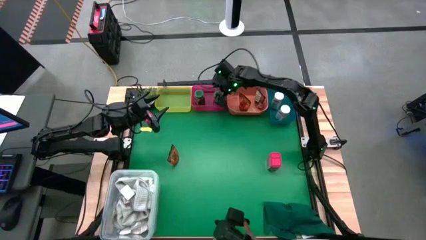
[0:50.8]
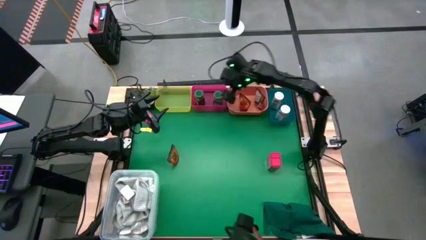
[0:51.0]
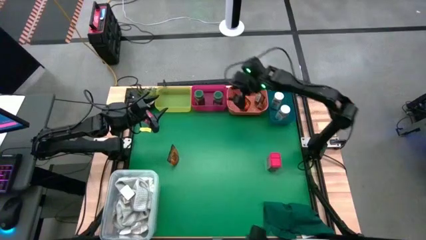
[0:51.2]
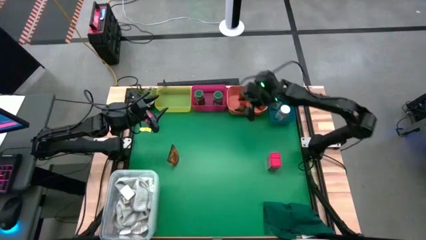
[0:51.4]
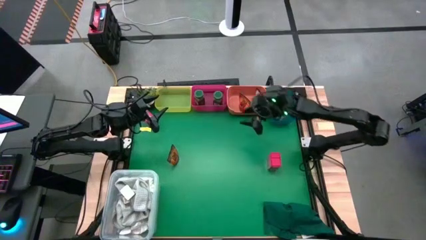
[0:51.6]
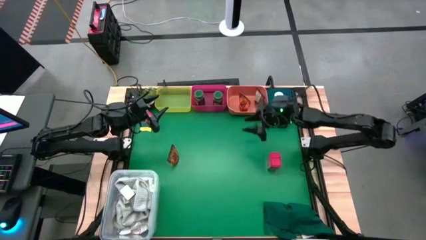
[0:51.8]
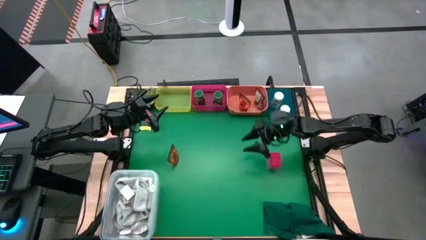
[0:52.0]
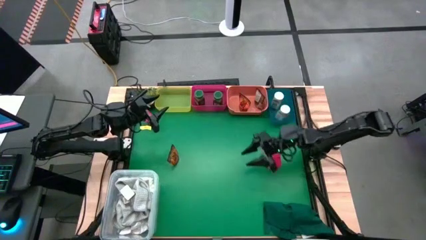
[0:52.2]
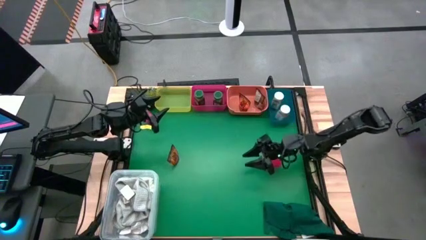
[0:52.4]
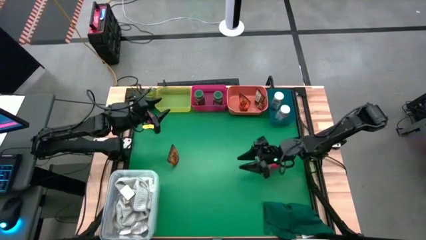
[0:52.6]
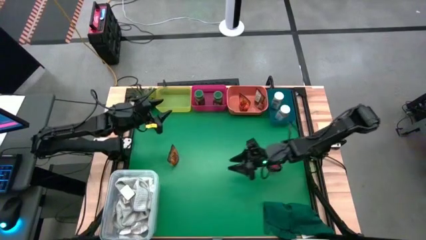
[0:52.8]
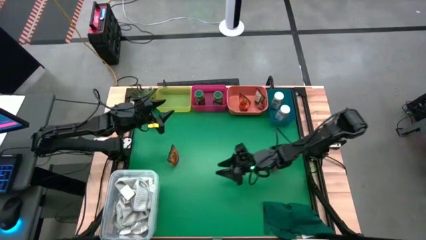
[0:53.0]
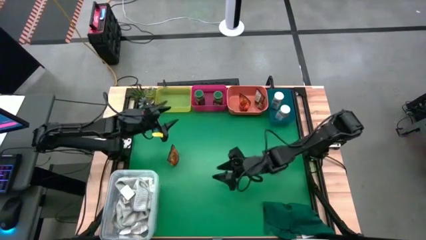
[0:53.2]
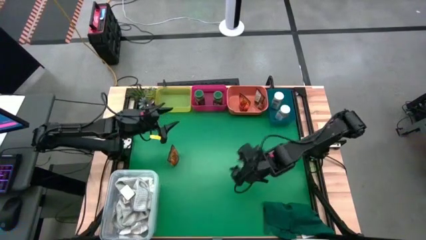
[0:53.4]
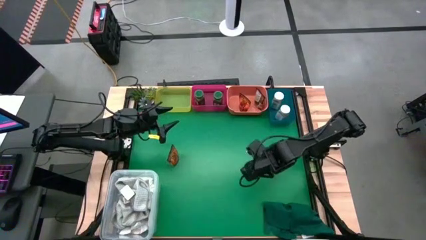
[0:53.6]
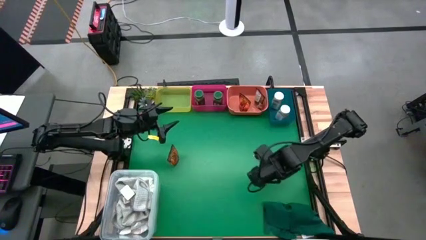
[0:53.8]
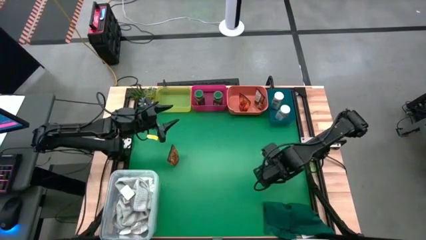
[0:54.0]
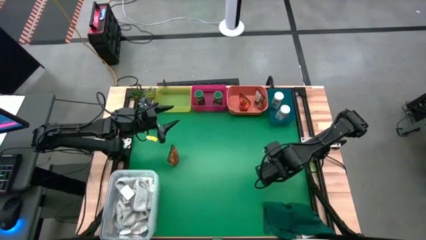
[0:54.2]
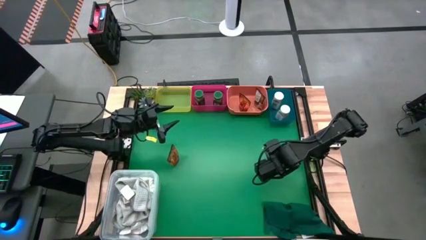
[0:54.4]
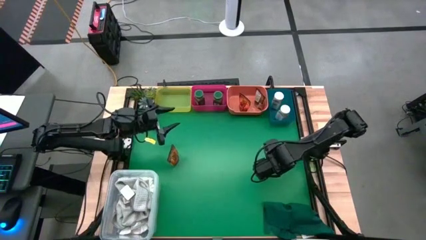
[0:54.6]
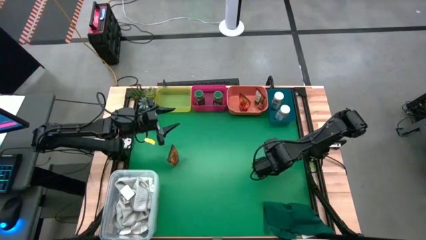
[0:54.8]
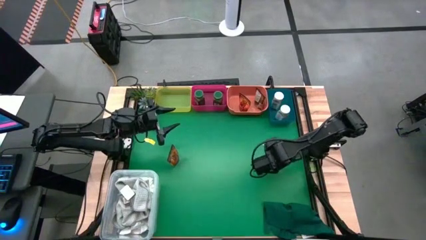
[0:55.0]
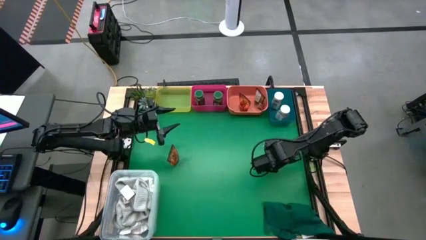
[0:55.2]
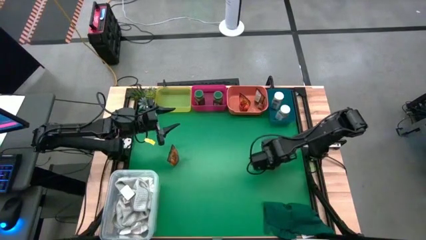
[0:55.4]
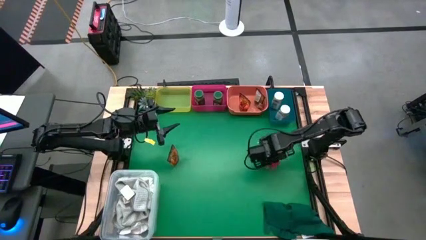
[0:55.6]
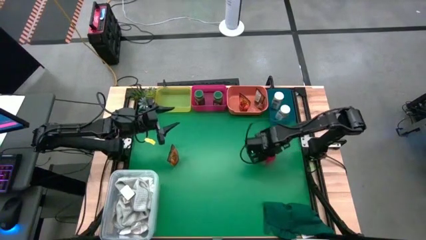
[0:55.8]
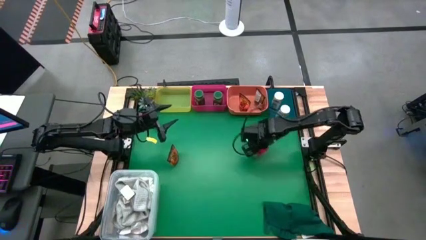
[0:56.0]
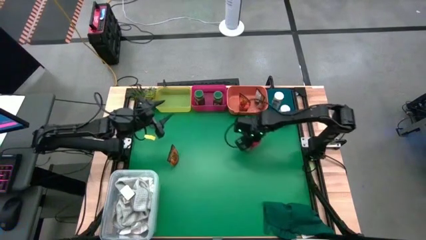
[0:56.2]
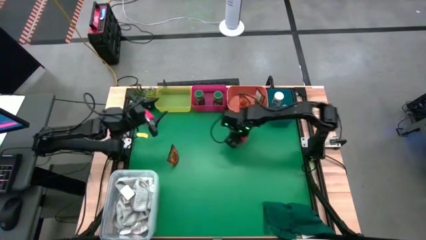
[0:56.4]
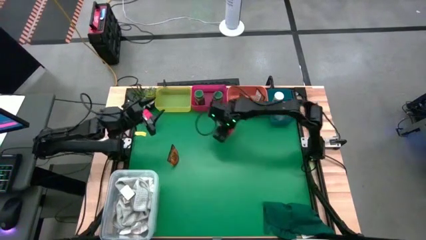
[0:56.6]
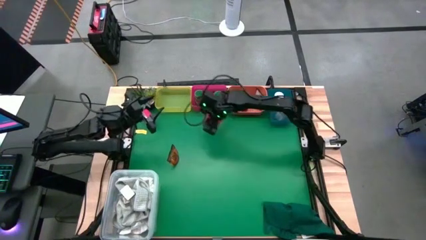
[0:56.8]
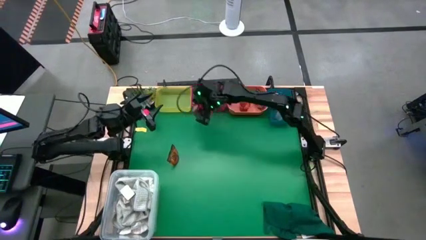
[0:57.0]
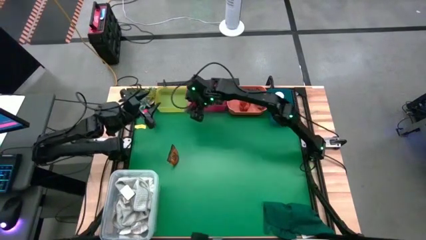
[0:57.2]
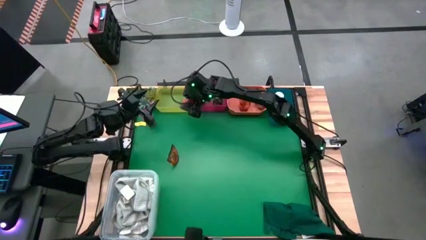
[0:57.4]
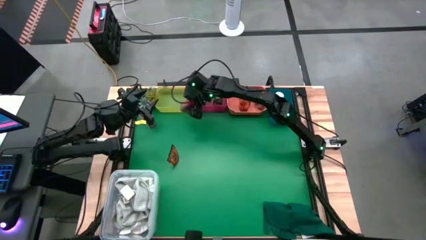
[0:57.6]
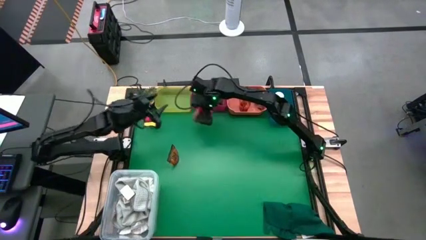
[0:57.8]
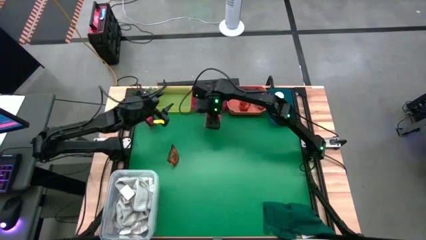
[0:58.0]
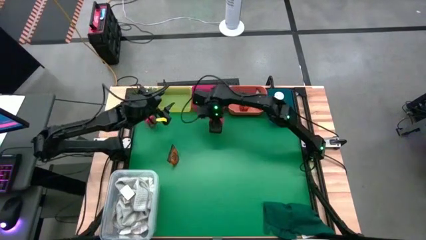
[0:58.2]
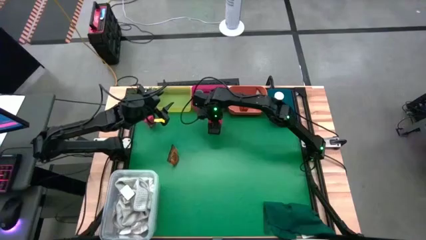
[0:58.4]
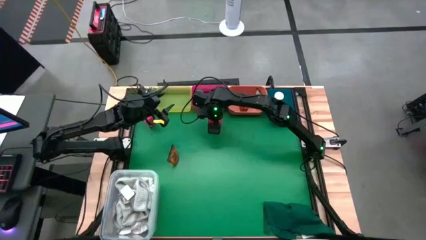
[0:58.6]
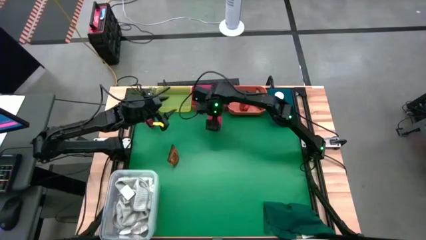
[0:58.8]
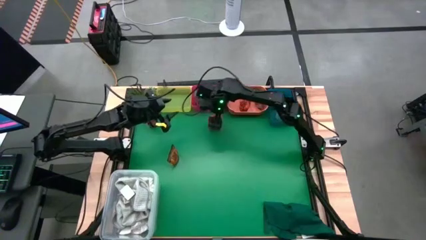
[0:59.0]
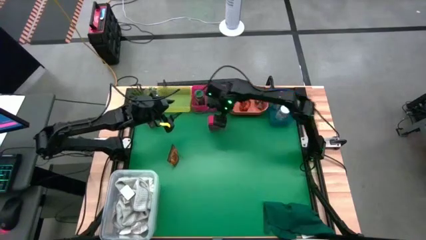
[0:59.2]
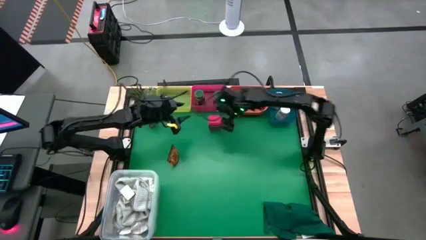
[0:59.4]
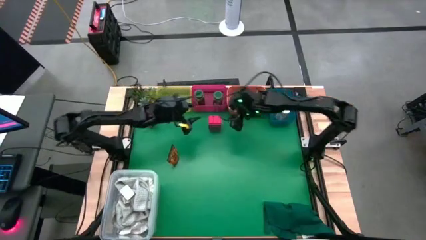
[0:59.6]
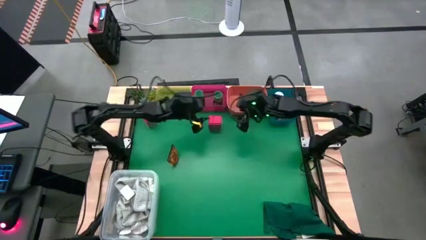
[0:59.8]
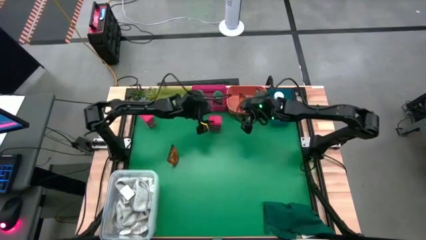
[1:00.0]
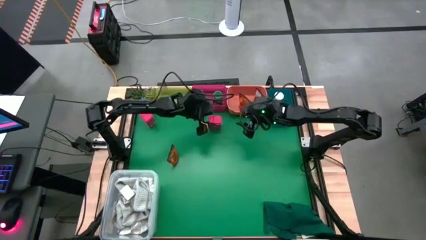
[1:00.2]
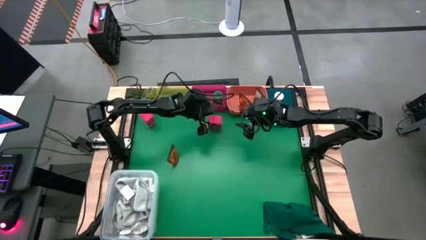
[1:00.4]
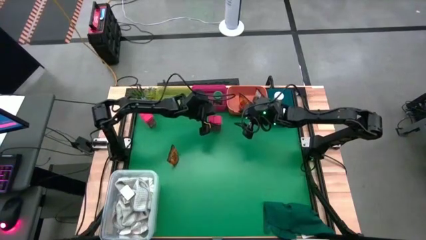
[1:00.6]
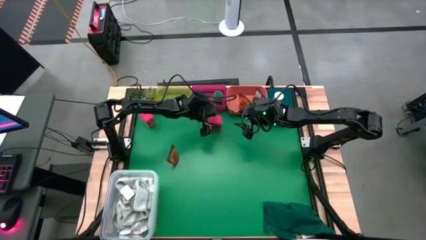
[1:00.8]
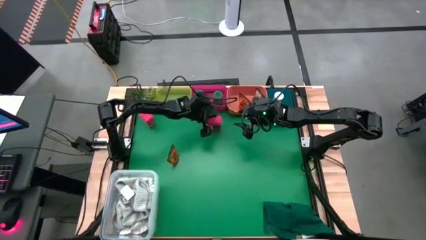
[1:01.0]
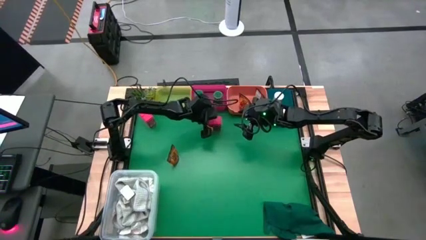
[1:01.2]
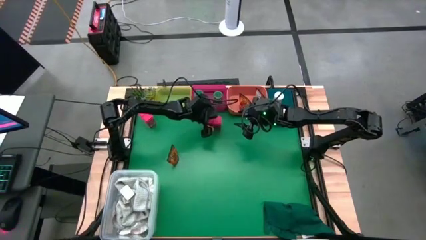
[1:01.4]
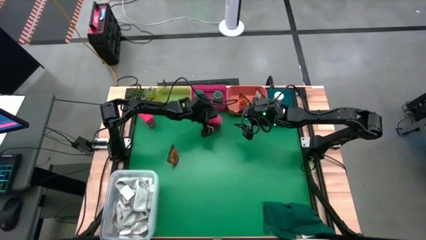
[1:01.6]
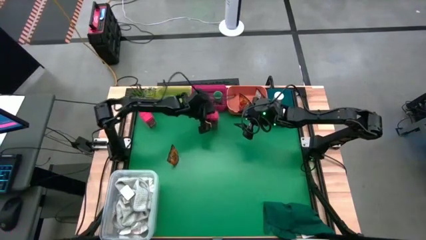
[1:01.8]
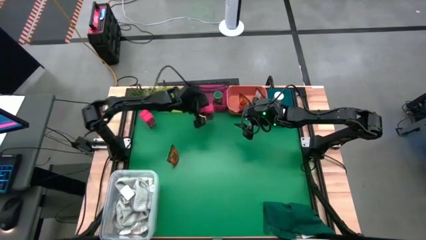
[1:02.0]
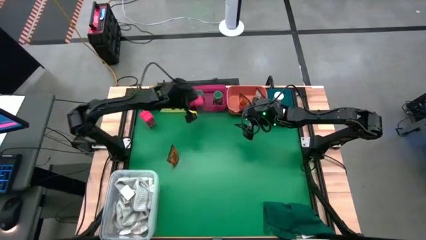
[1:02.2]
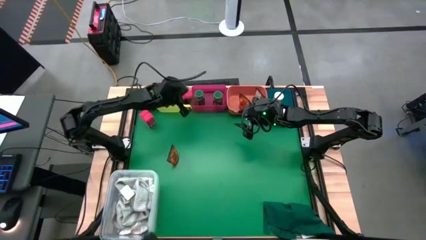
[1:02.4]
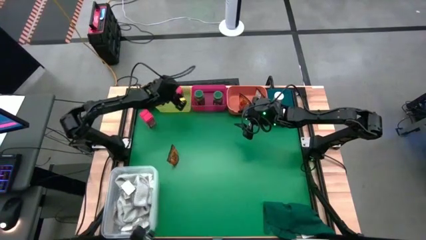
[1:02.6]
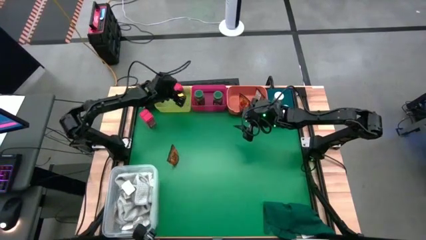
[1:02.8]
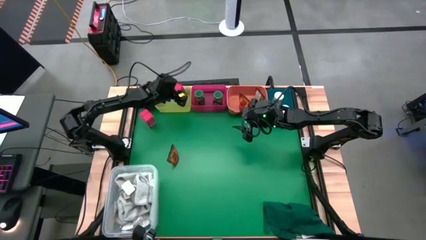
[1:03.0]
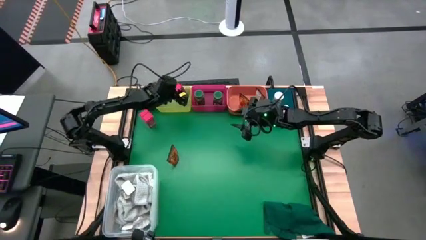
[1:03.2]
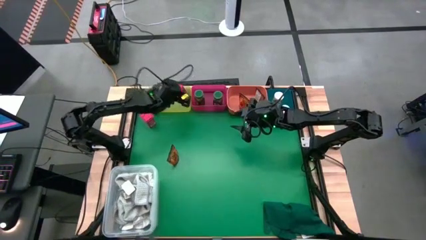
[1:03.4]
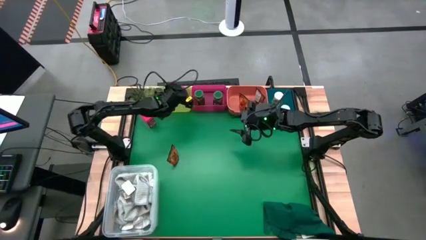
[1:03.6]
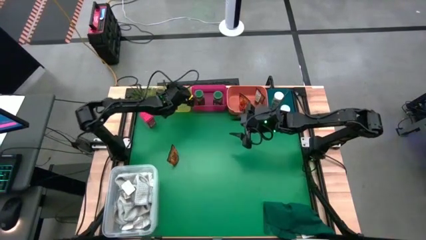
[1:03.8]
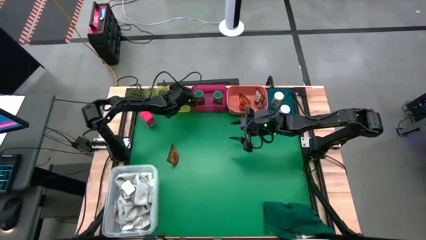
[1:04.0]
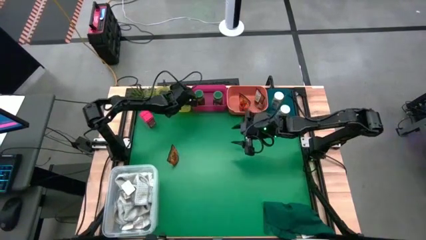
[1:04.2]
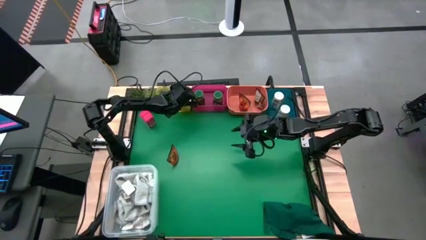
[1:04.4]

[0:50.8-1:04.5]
Task: Sort spices by type
Put the right red seasoning can into the yellow bin
